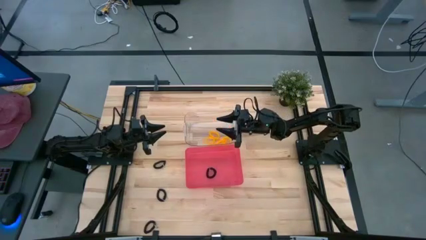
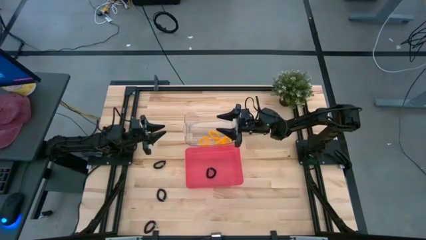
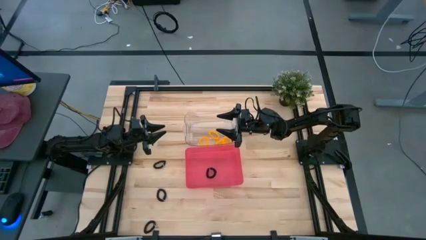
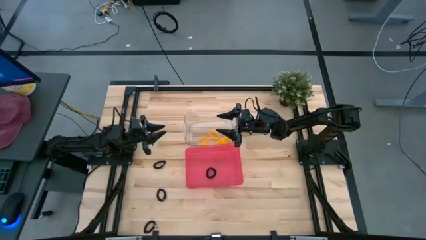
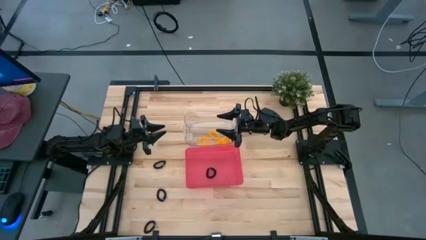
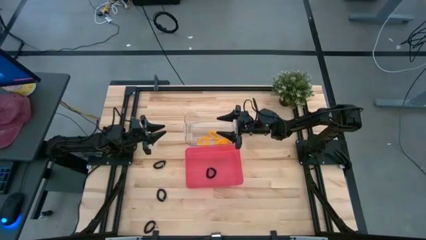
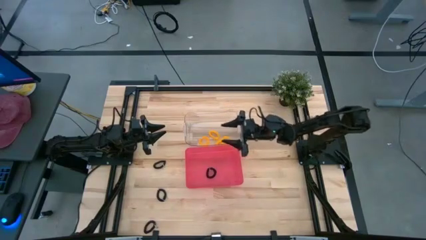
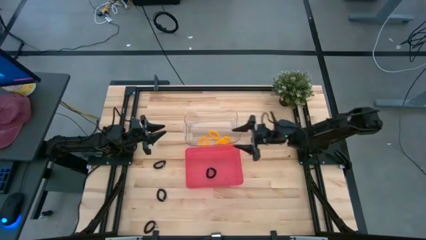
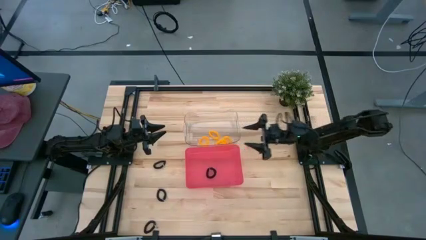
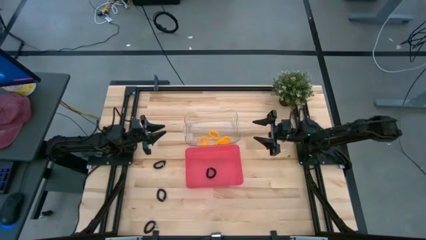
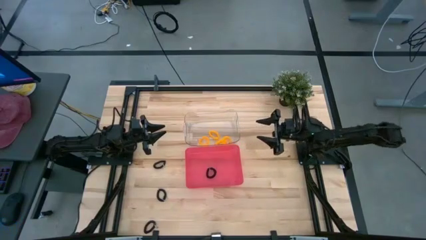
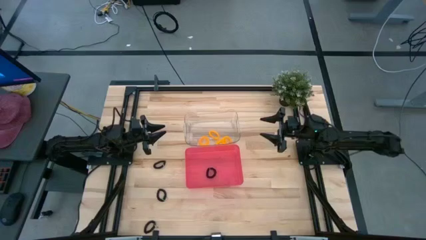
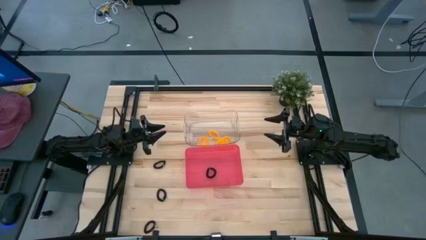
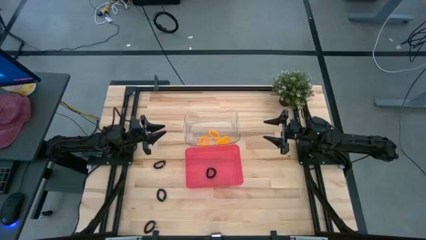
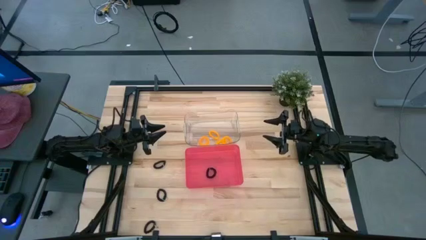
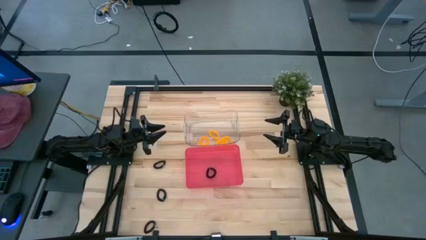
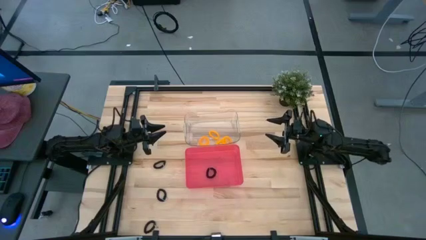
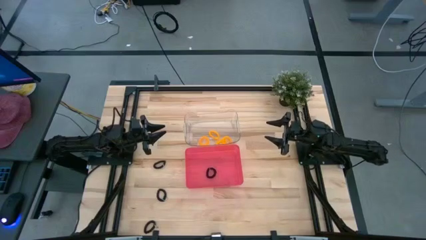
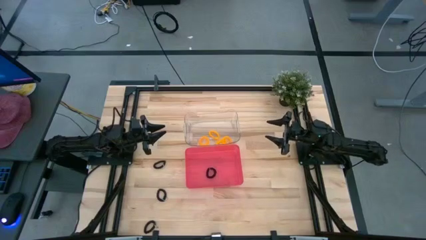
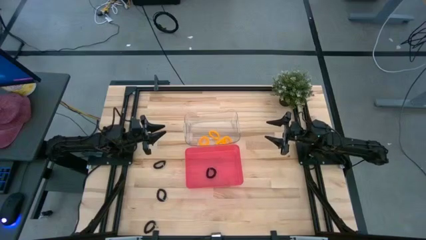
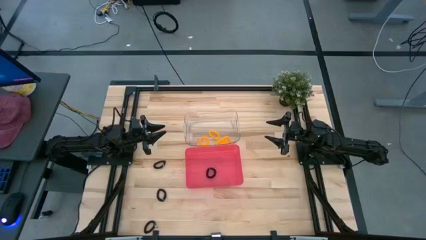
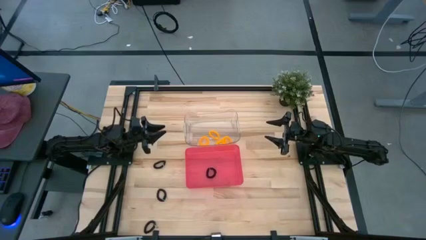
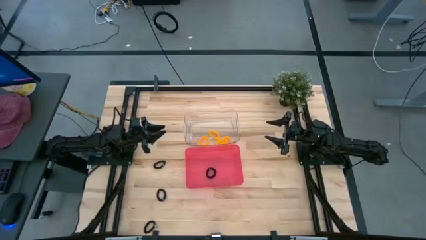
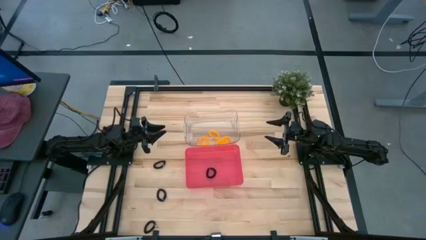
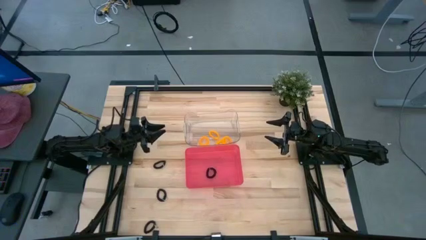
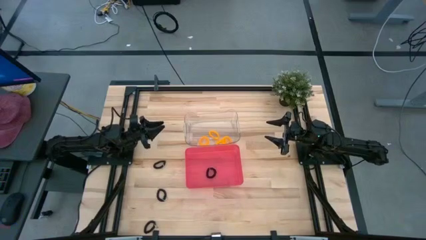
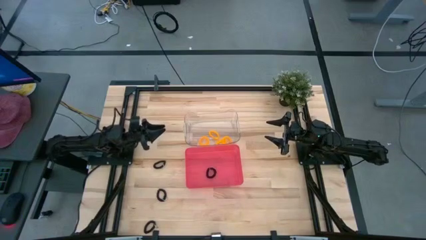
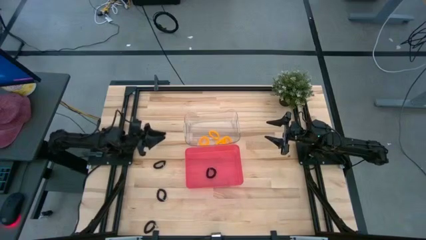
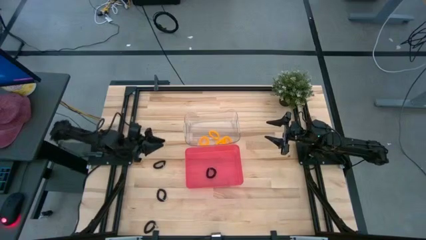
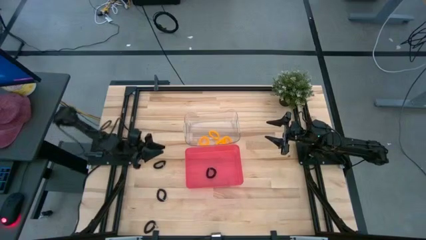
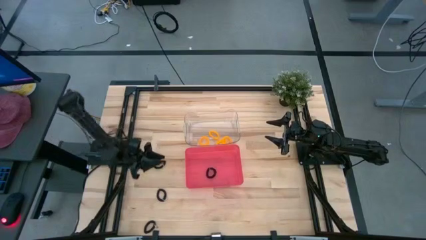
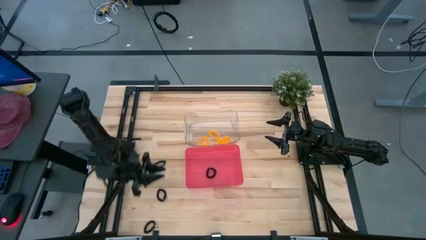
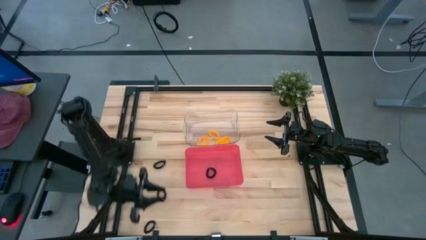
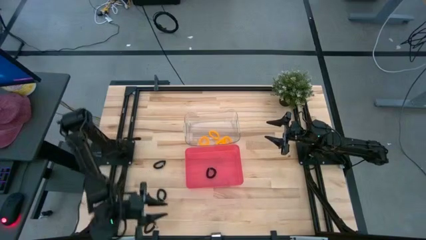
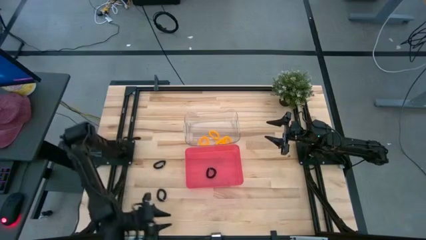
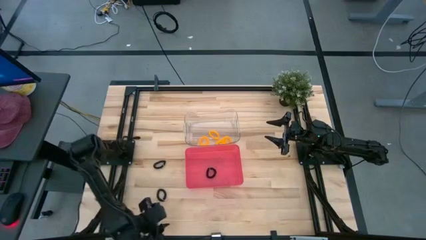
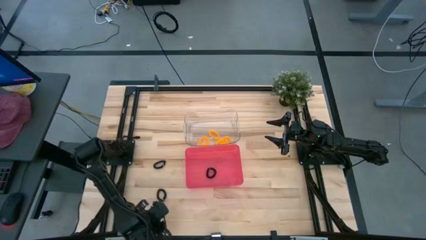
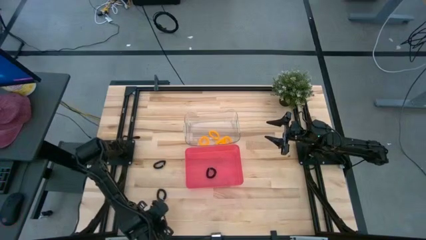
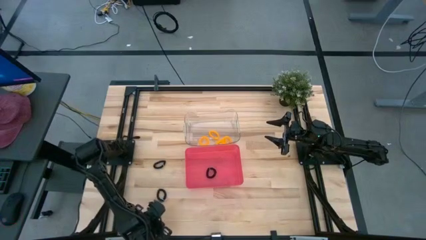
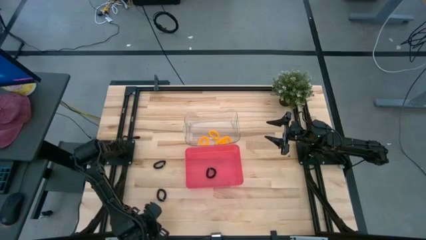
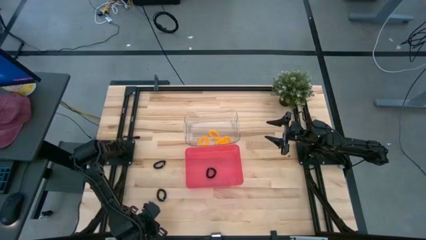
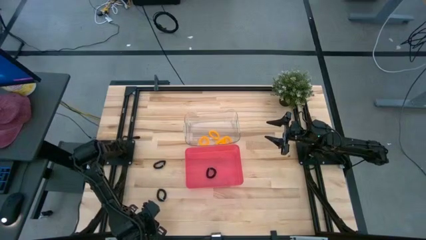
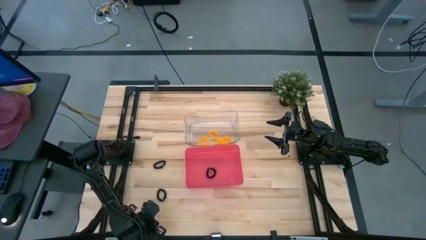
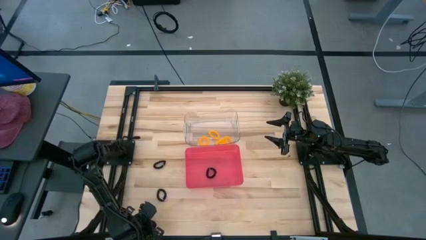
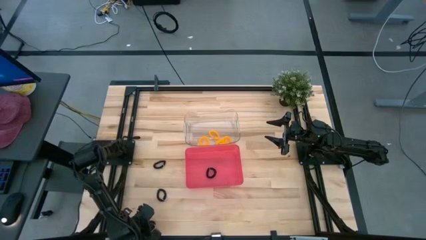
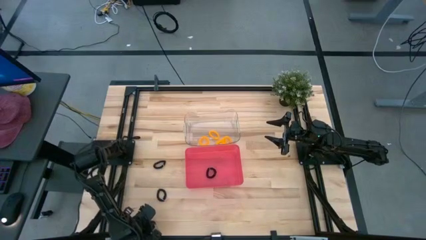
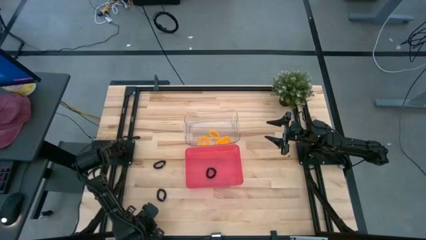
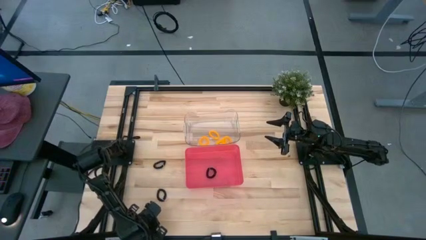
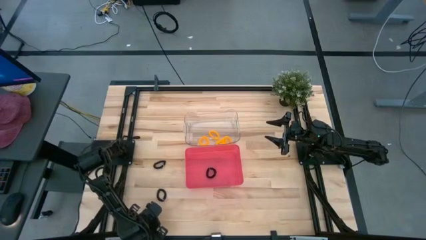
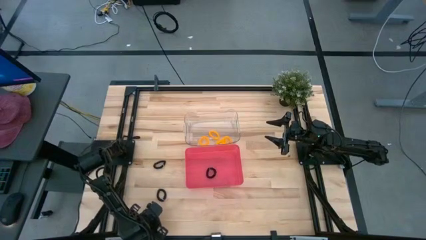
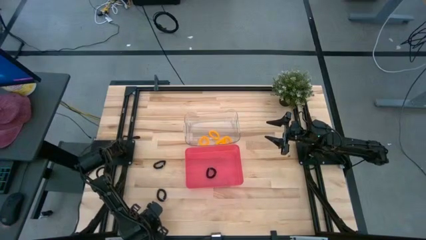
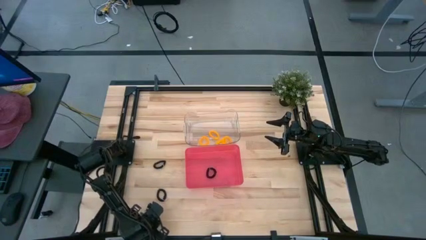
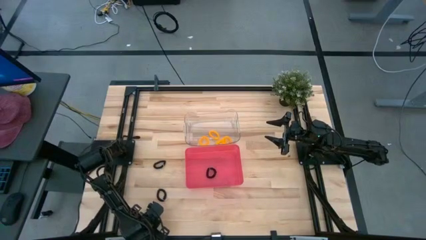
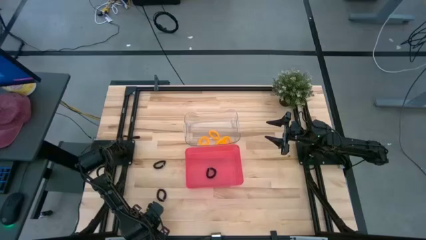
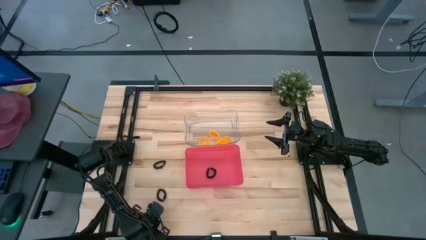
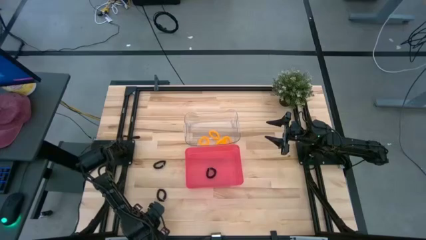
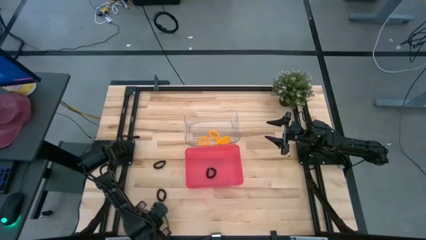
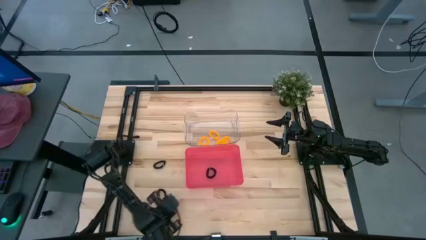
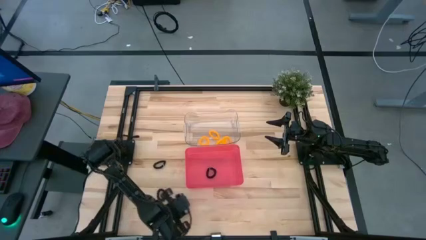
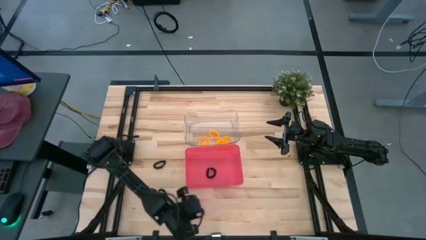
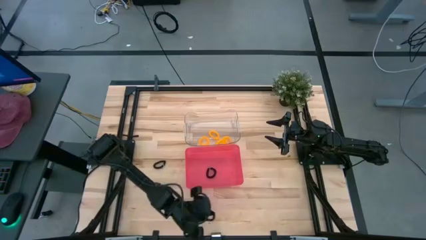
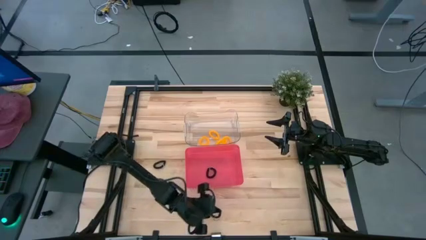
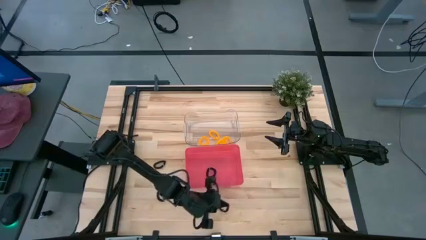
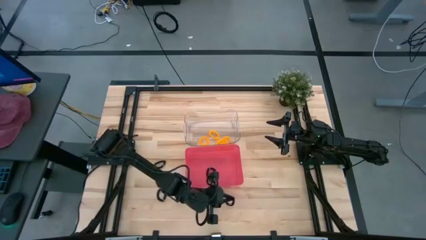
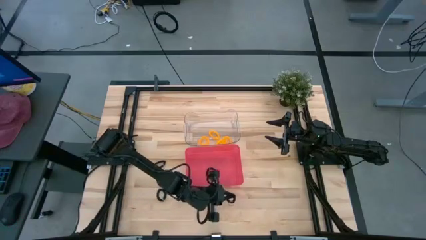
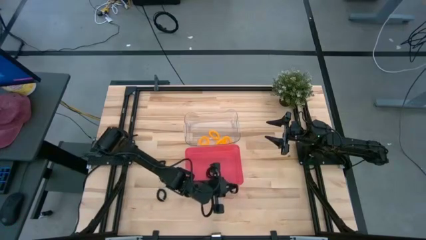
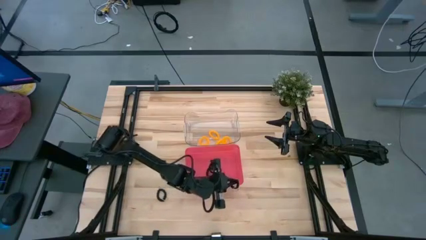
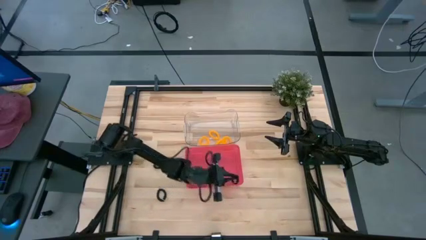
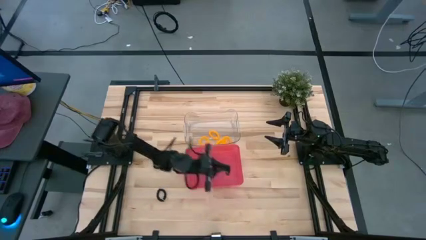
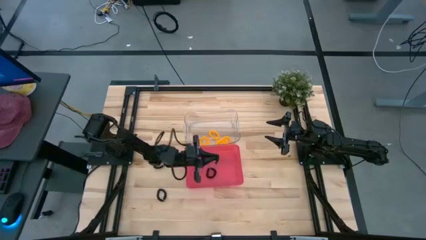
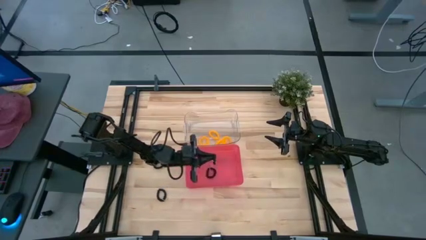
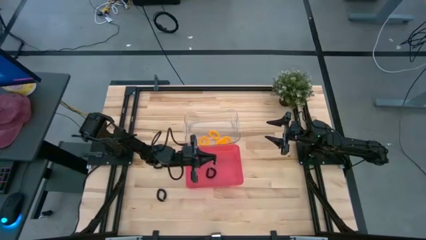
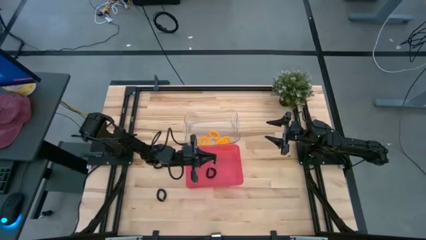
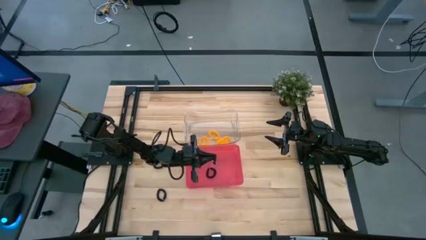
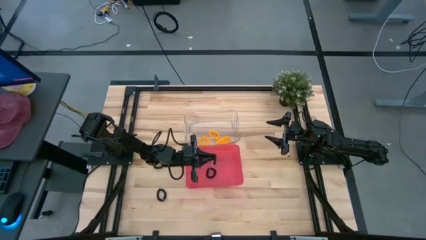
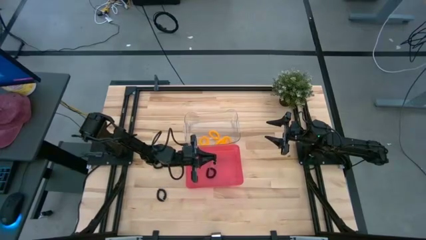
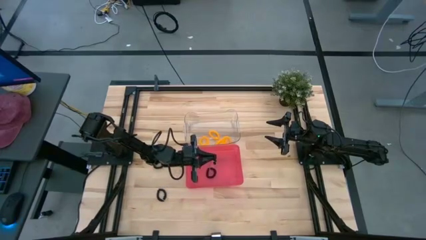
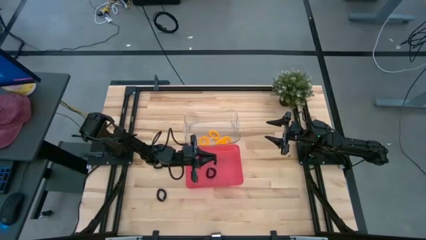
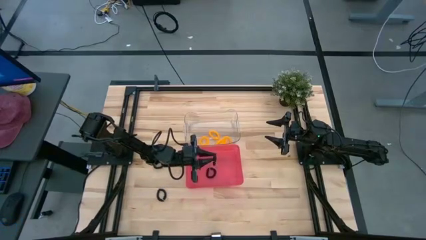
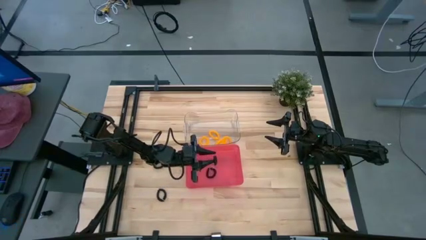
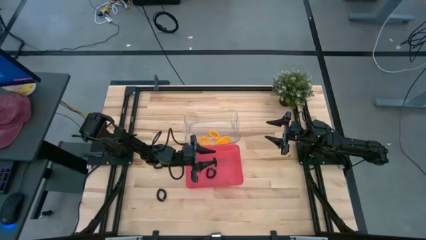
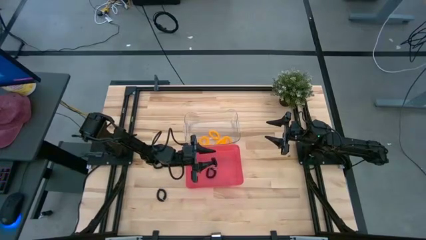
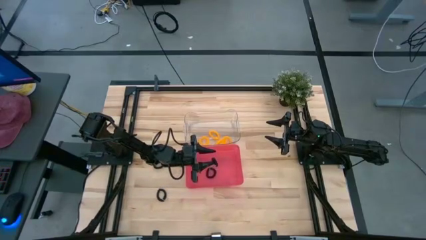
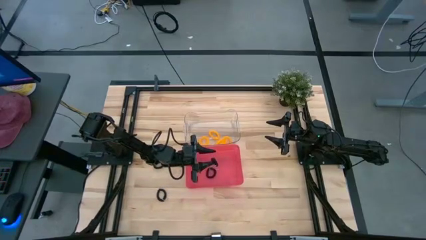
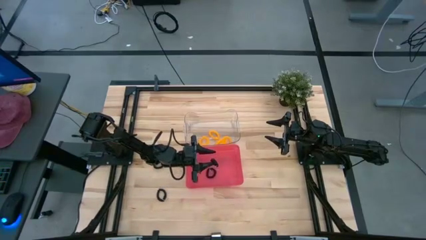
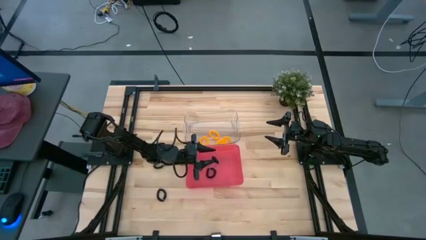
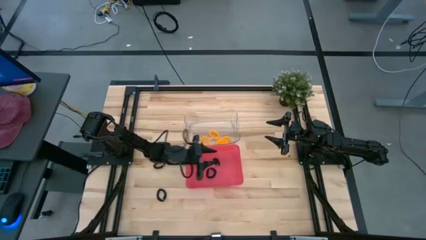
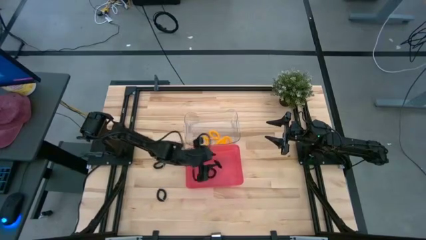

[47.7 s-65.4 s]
Task: Sort spring keychains
Put the black spring keychain into the red bin
